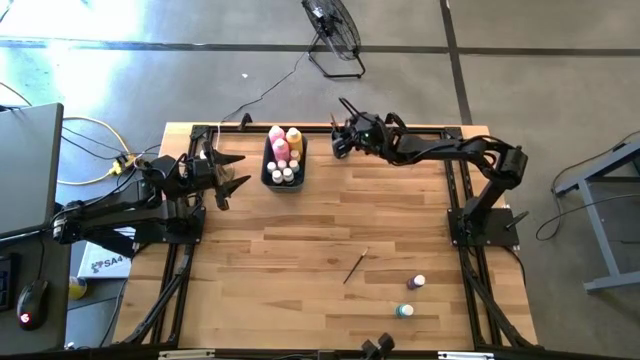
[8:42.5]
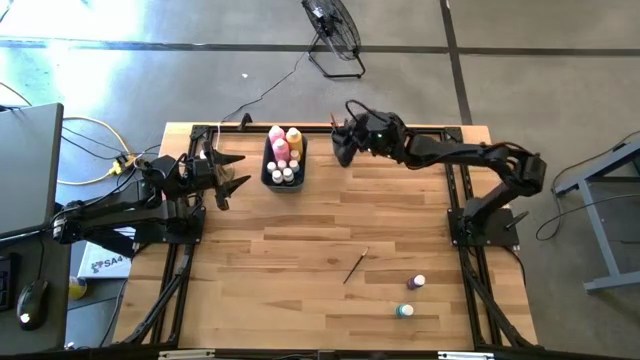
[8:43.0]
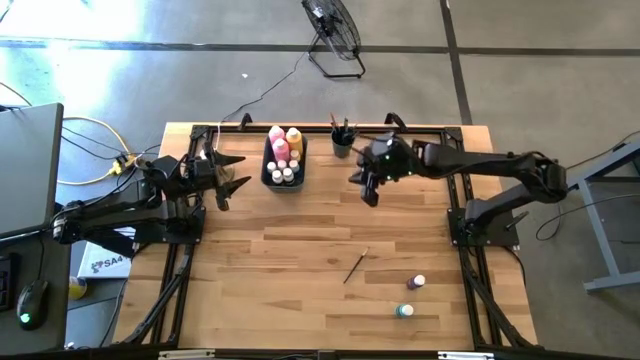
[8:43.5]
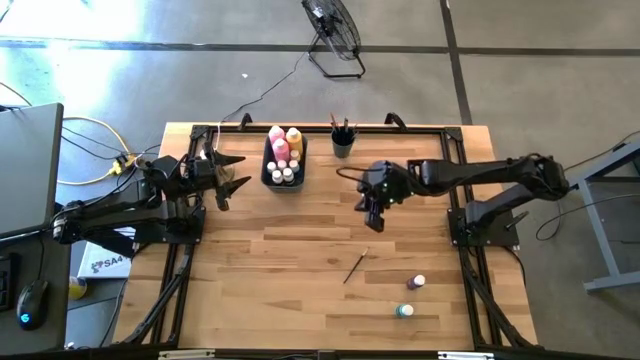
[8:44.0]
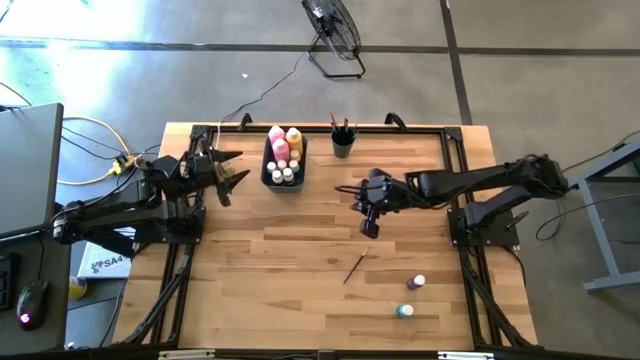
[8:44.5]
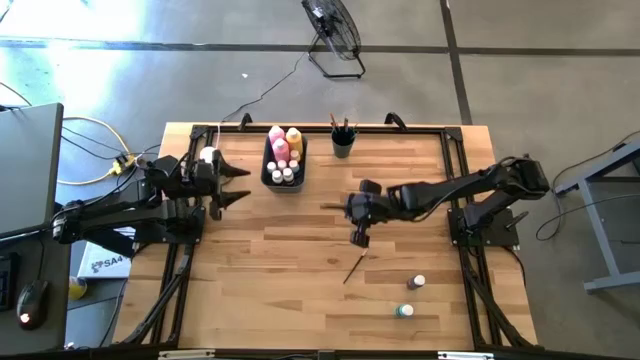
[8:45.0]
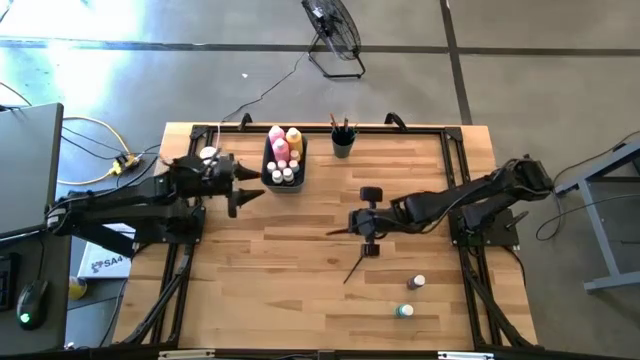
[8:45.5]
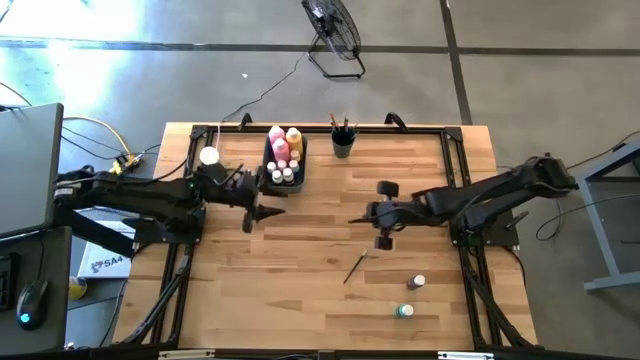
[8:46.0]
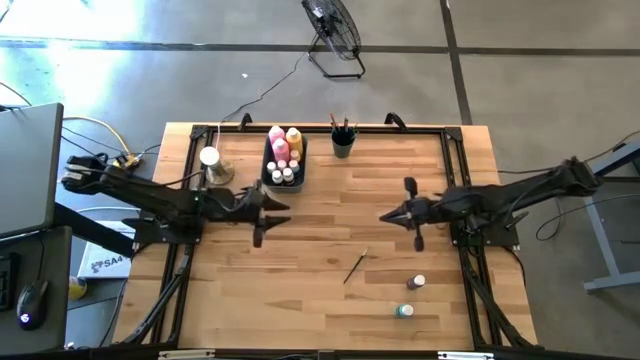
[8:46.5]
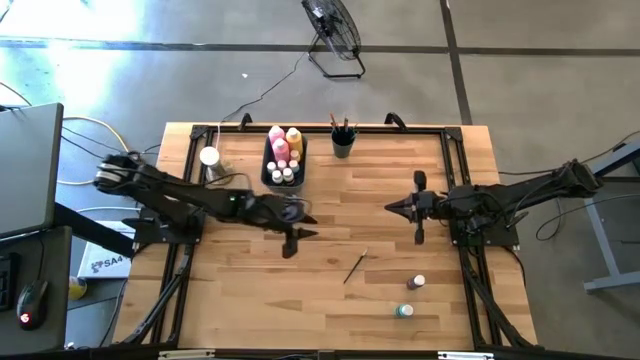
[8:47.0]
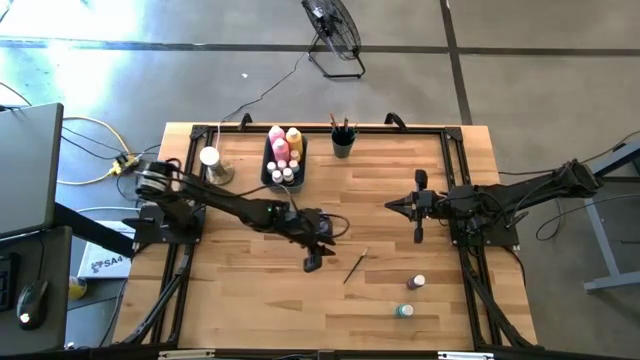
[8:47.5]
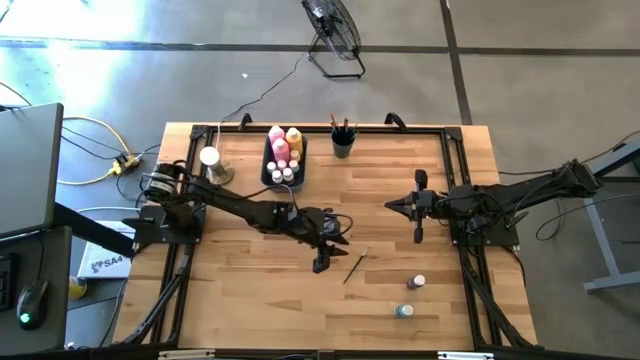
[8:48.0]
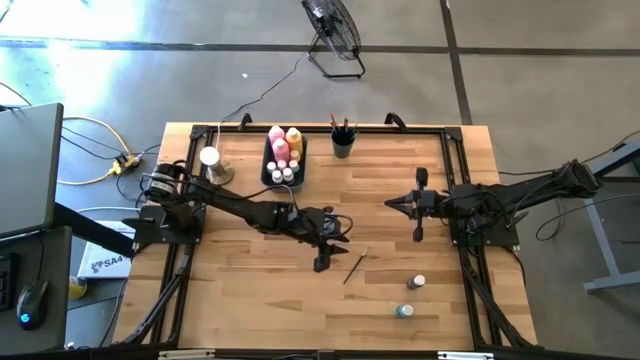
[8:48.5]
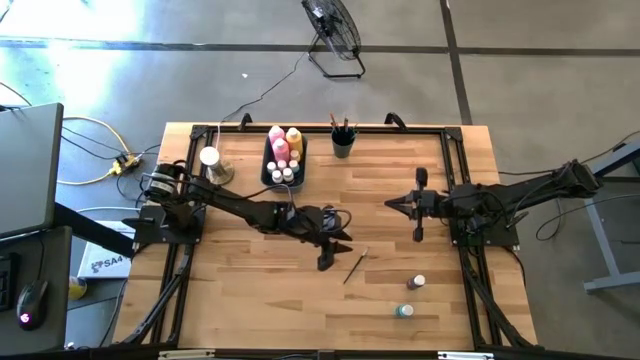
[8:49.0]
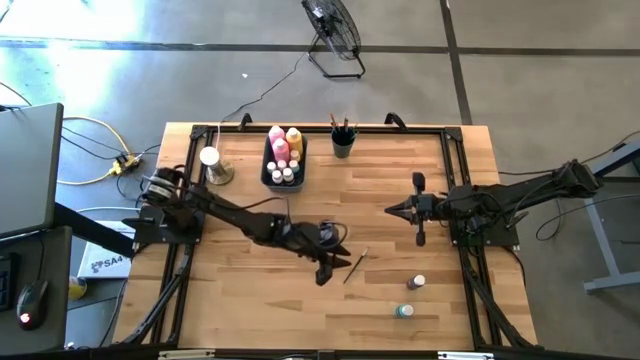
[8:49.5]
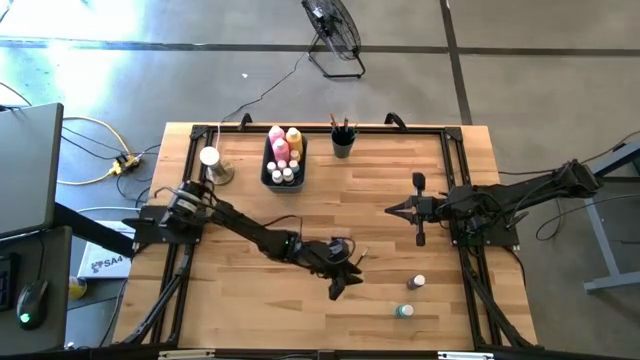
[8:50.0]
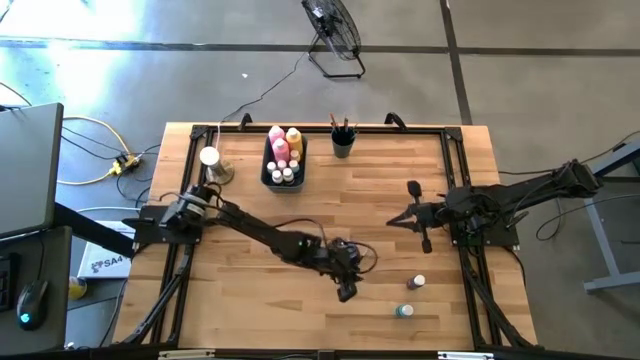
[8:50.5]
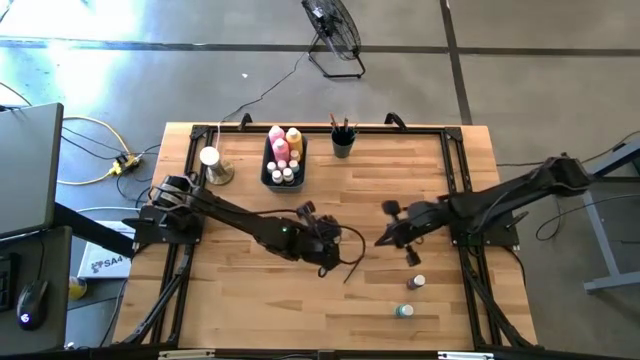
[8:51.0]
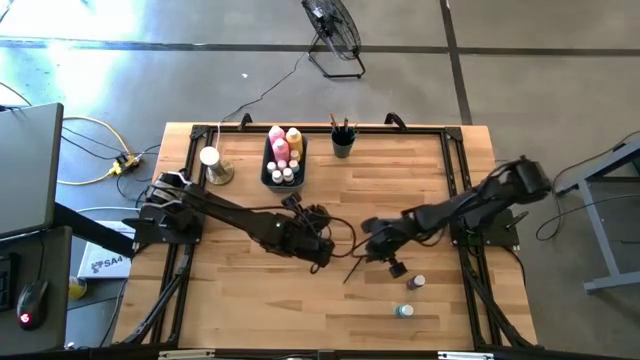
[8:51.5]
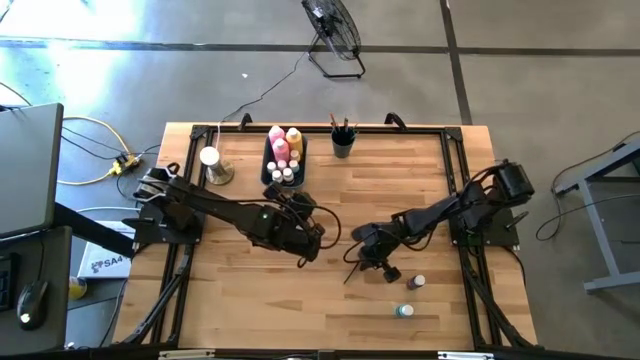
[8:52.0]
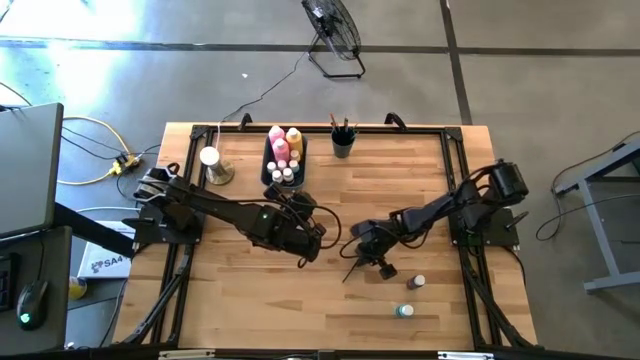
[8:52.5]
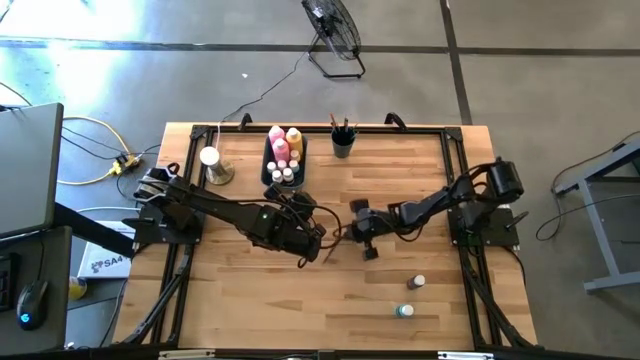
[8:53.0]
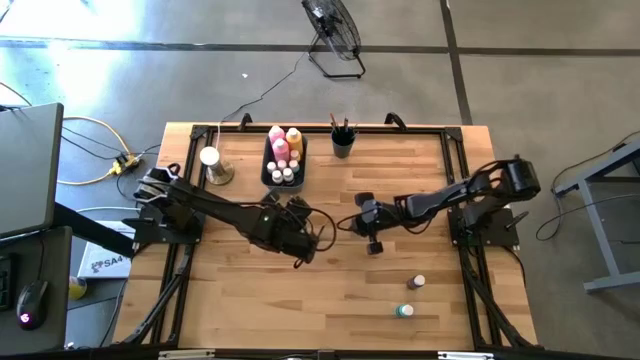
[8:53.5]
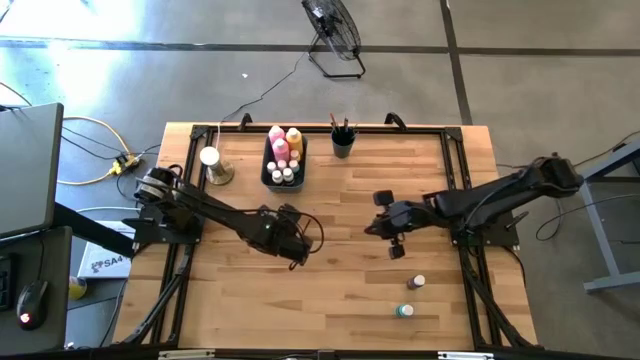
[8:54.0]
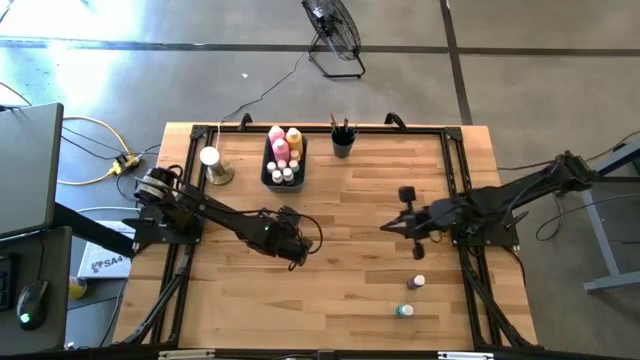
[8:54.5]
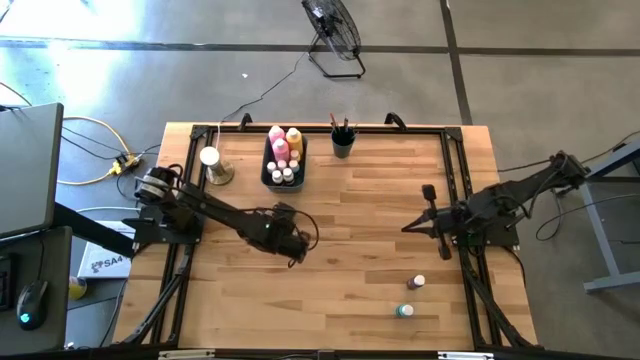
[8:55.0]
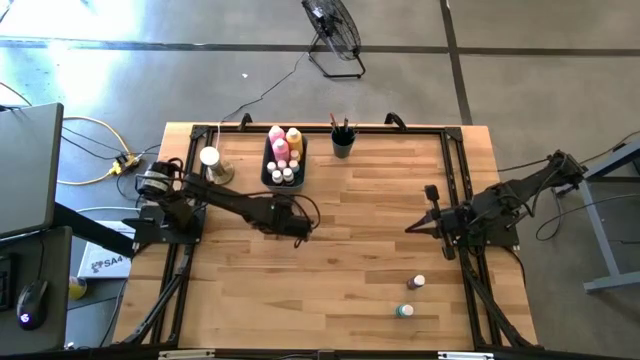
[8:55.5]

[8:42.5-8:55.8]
Task: Pick & Place Paint Supplies
Put the silver paint brush into the green cup
